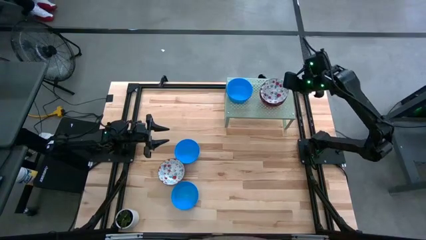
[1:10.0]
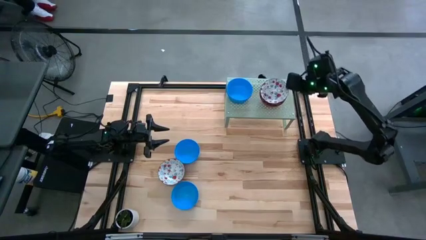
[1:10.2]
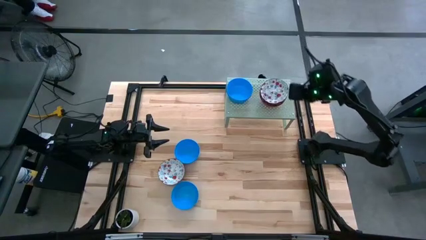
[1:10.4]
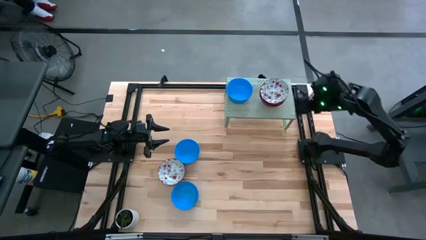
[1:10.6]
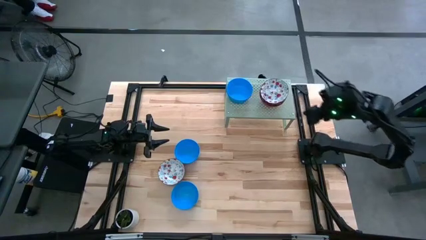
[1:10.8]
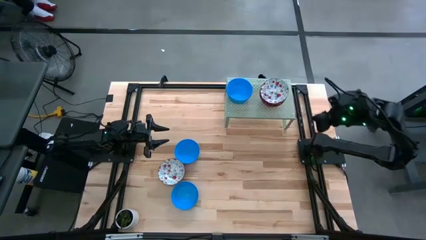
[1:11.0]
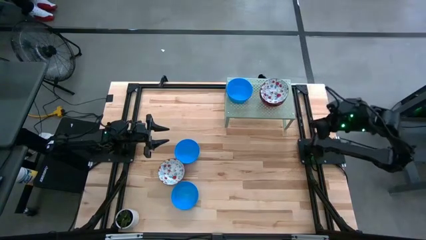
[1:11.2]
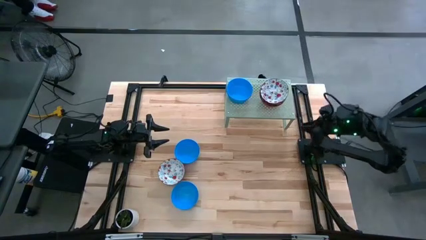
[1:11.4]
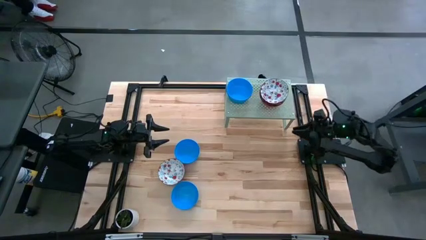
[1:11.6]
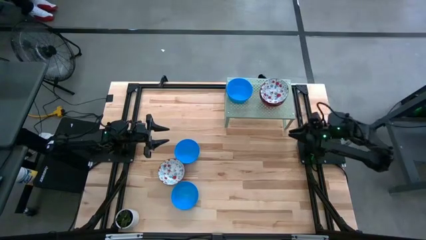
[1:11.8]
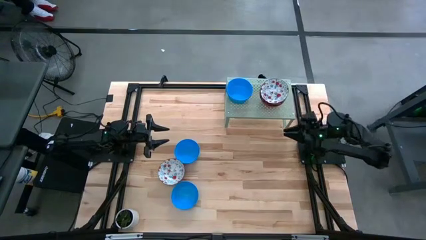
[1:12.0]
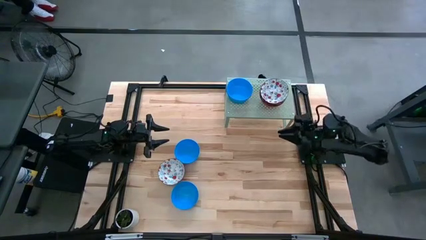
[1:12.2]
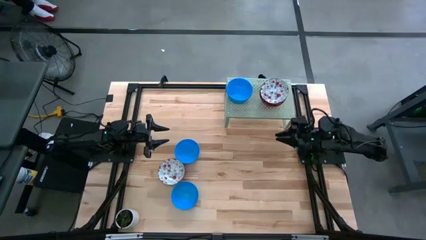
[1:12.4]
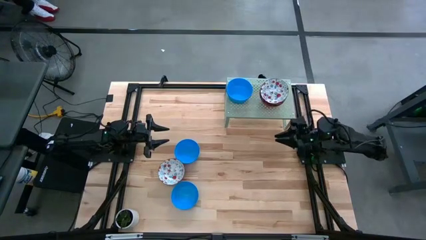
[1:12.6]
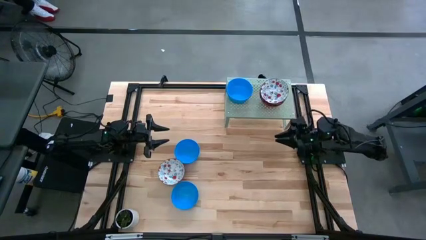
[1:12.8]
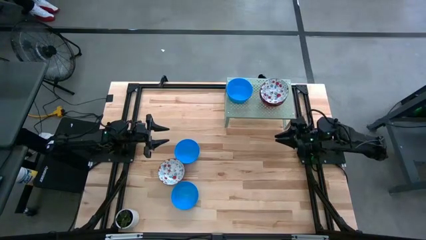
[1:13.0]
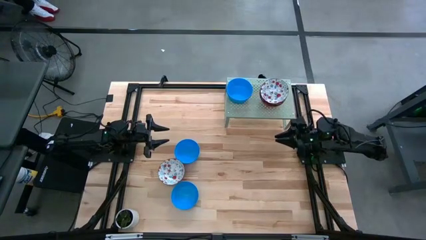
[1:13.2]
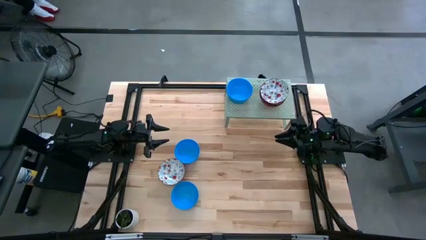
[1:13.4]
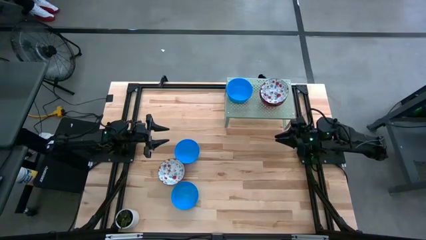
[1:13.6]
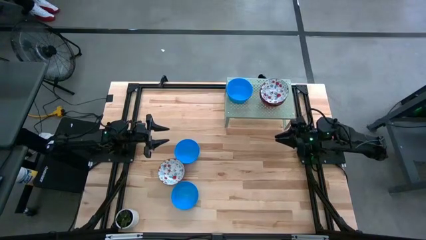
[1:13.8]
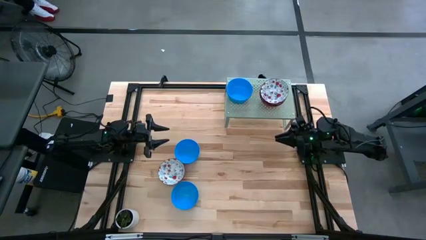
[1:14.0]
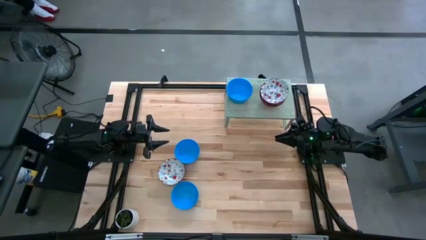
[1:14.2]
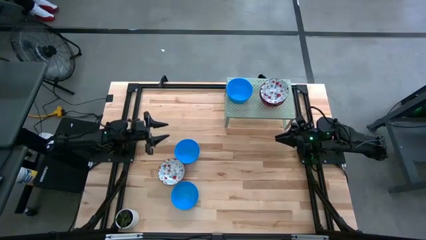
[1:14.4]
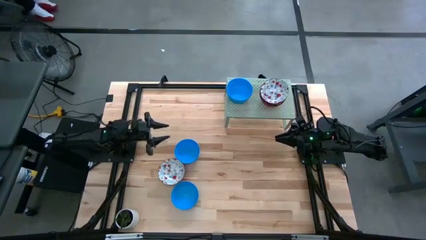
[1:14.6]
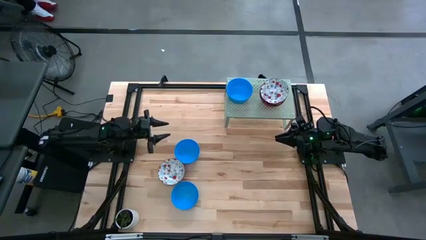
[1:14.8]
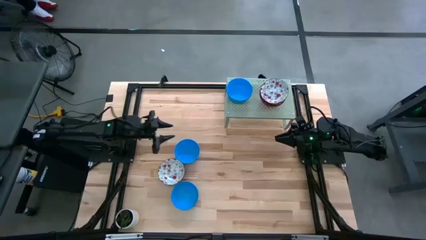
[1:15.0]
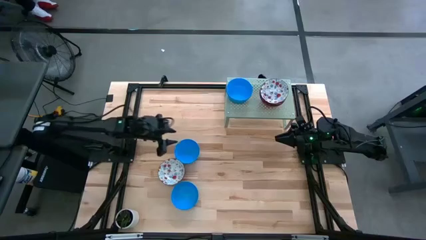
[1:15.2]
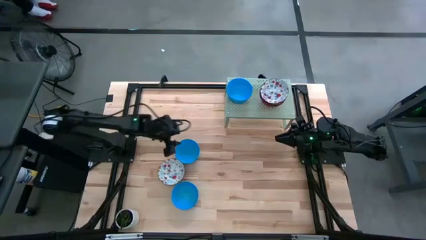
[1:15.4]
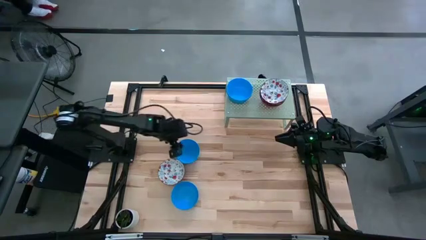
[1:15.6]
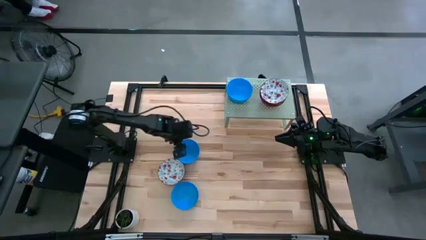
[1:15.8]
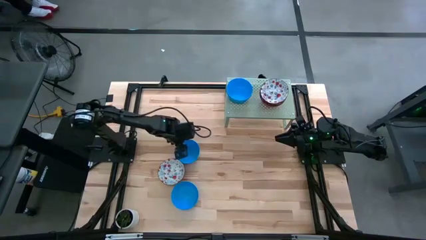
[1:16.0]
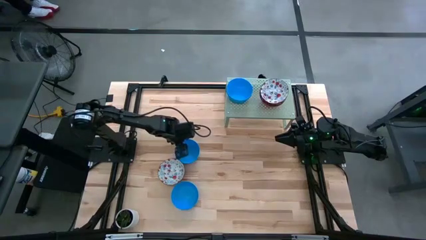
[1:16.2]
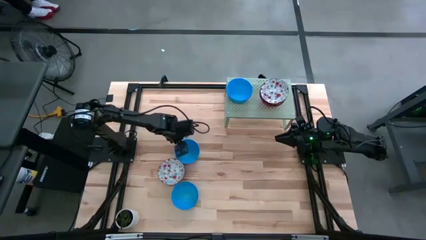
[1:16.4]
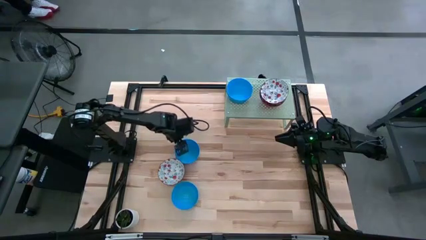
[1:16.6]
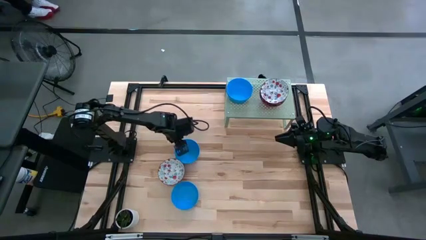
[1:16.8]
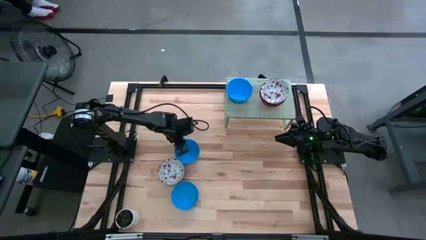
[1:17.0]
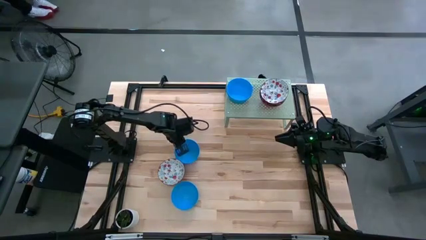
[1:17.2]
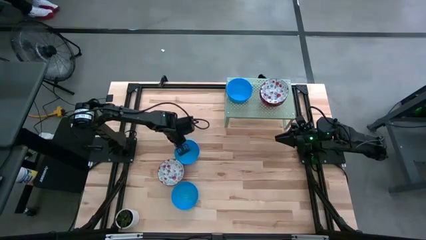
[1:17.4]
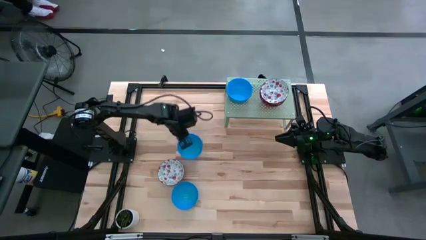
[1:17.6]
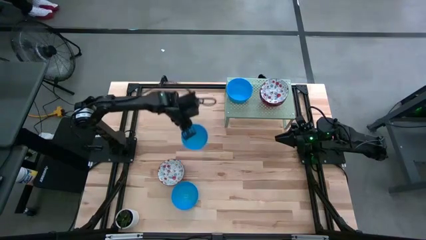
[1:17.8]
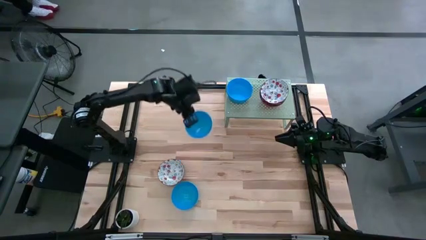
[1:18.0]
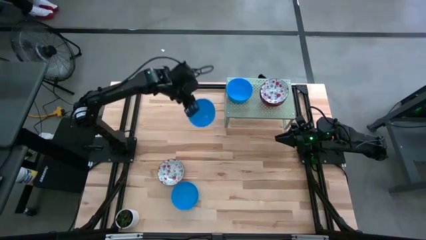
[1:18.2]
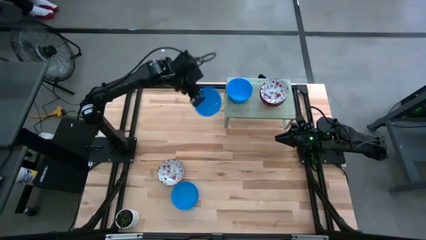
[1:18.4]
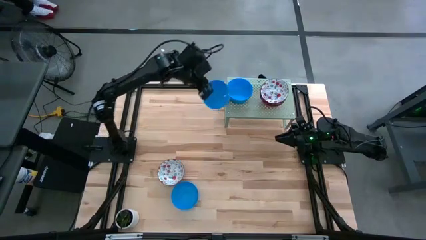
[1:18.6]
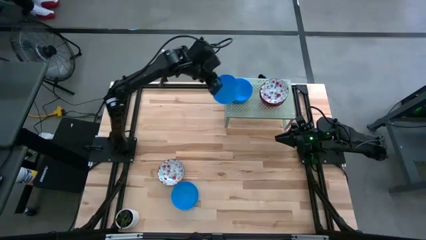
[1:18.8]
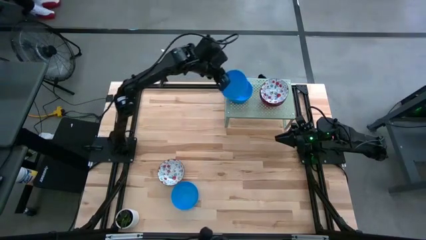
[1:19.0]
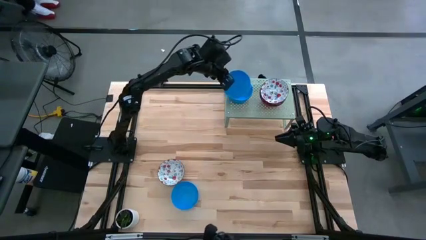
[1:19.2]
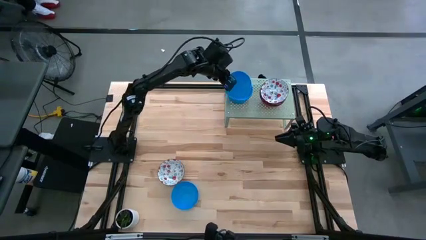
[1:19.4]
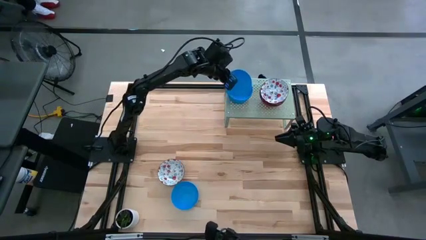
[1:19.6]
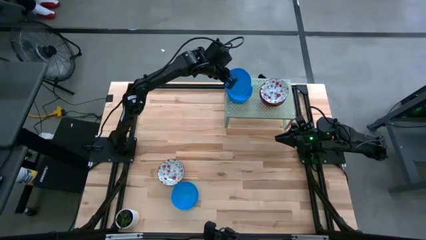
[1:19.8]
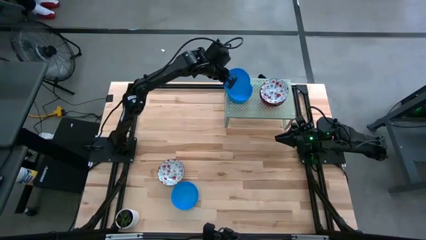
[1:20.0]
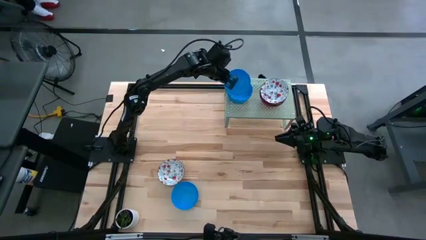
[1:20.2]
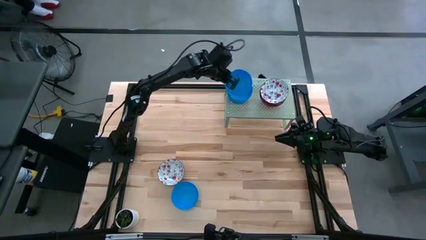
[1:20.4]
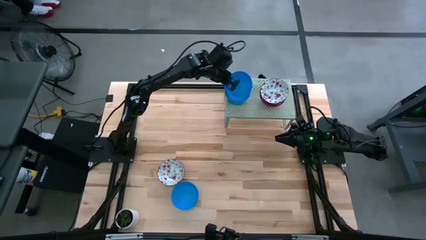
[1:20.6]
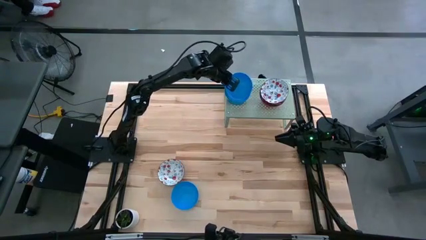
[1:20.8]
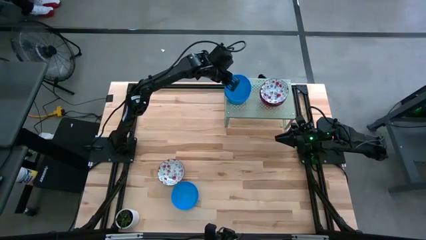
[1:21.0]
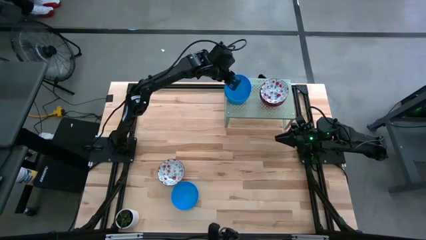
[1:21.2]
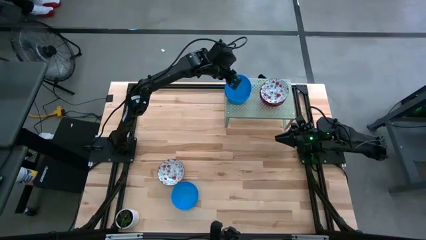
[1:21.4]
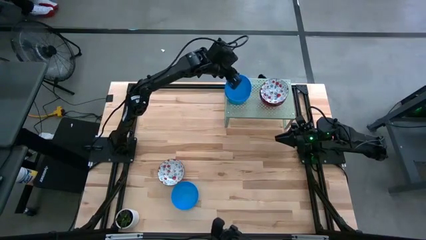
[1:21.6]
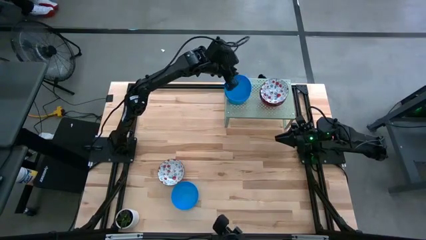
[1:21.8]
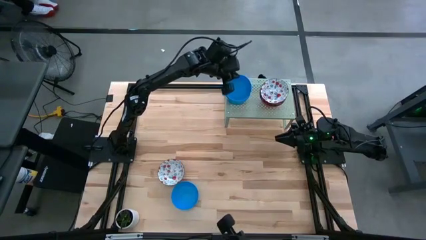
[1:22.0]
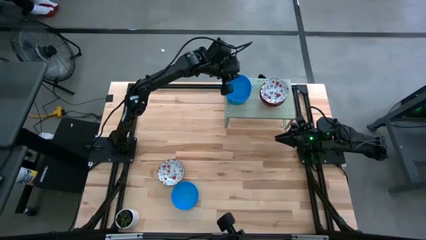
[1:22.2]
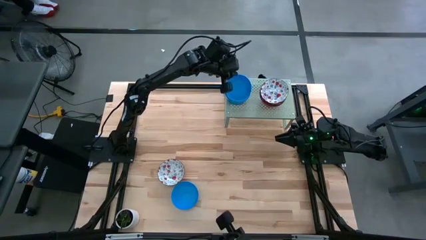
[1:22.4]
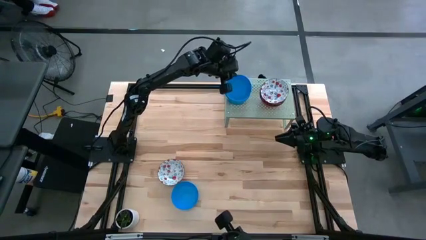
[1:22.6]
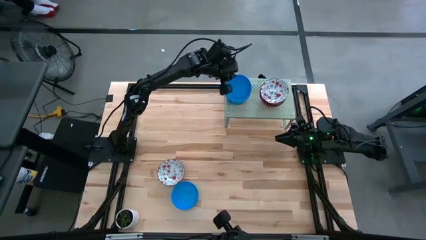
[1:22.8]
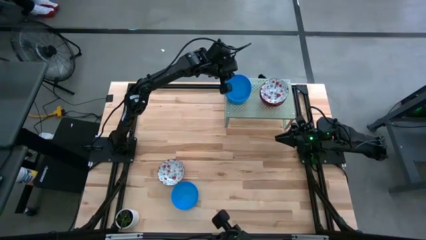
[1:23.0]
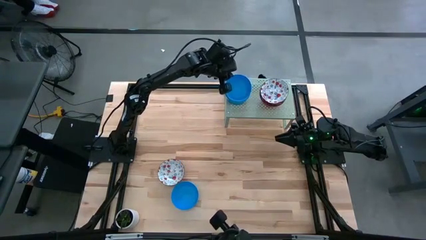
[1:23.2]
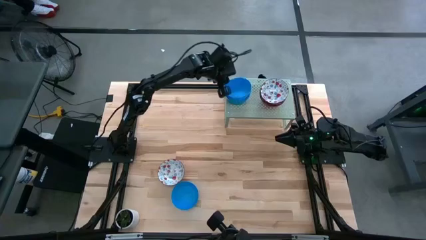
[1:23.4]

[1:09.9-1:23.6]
Task: Pick & Place Mini bowls
Stack the blue bowl on the blue bowls on the shelf
